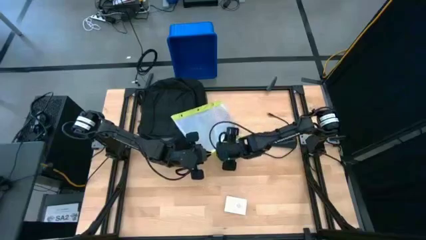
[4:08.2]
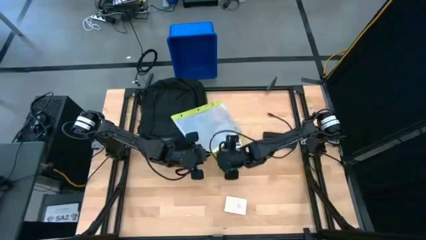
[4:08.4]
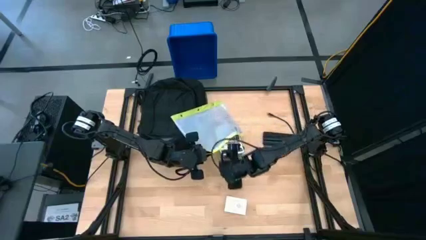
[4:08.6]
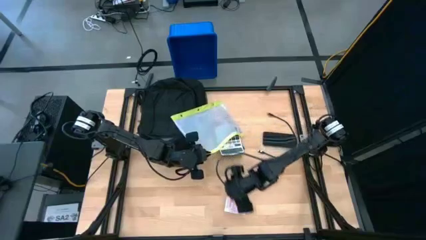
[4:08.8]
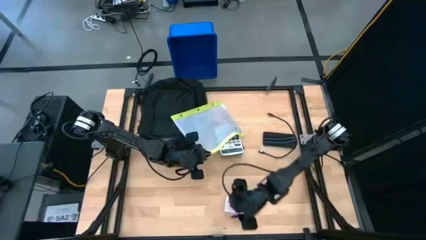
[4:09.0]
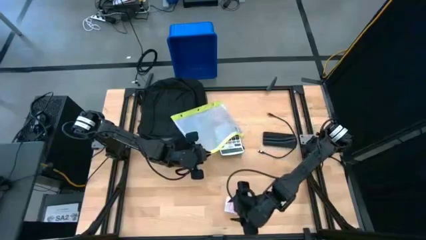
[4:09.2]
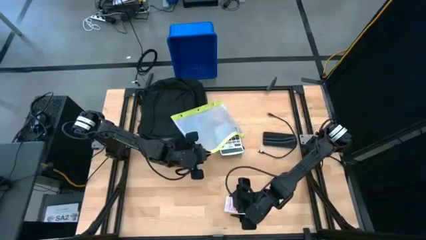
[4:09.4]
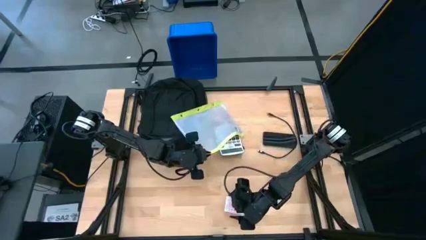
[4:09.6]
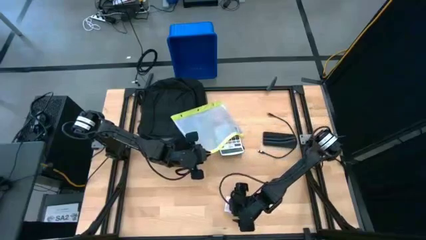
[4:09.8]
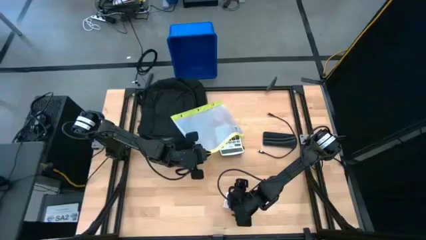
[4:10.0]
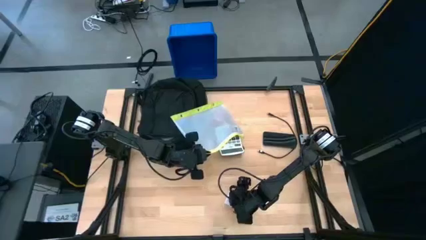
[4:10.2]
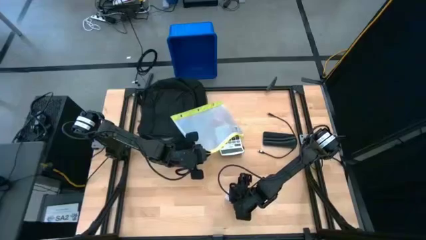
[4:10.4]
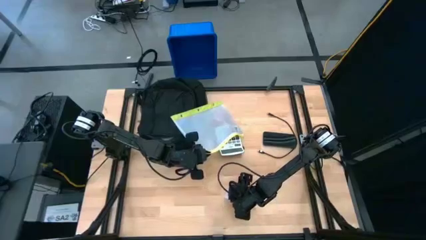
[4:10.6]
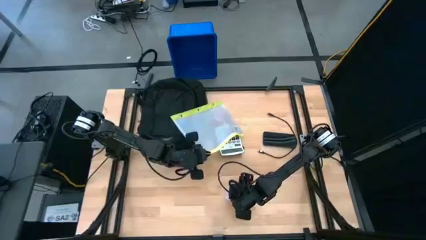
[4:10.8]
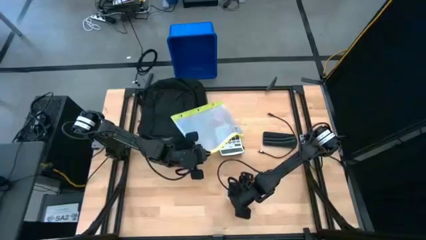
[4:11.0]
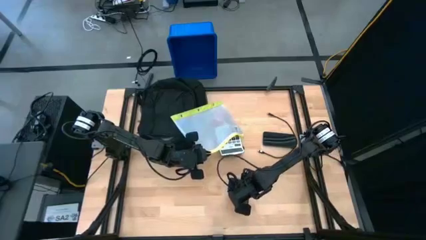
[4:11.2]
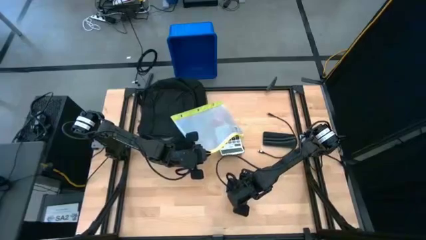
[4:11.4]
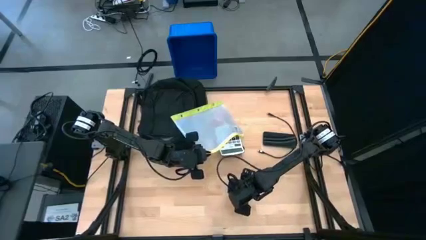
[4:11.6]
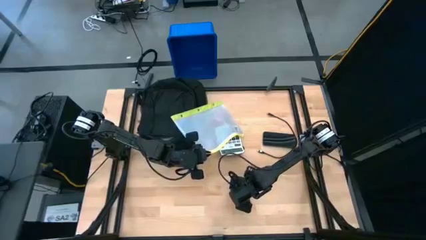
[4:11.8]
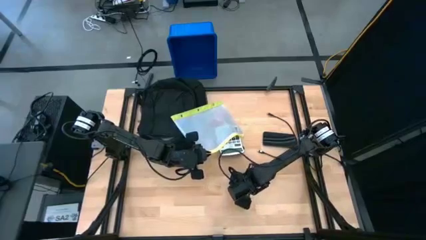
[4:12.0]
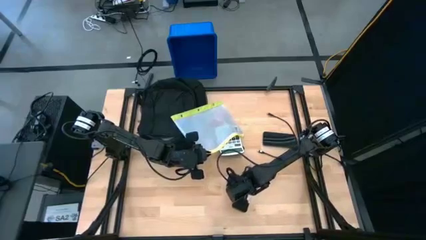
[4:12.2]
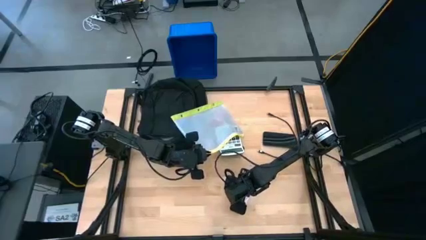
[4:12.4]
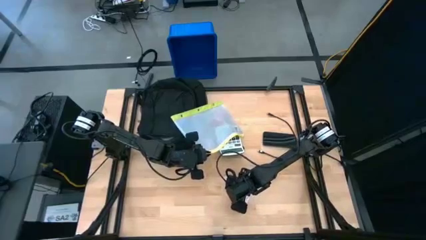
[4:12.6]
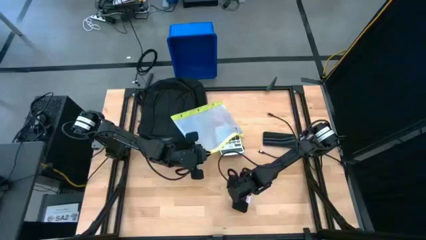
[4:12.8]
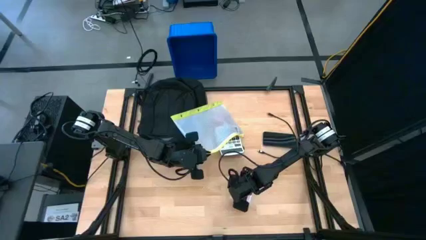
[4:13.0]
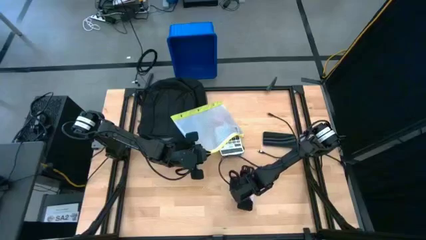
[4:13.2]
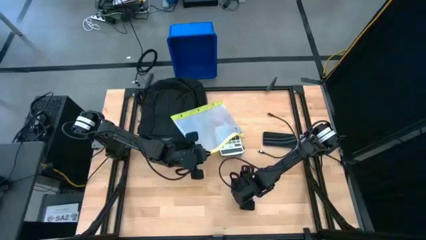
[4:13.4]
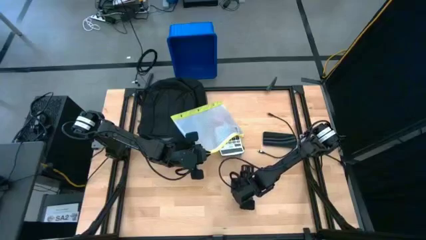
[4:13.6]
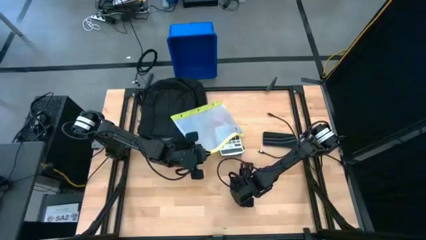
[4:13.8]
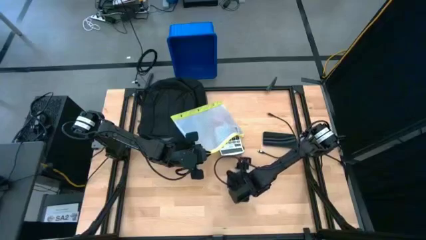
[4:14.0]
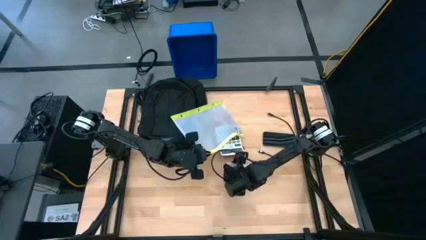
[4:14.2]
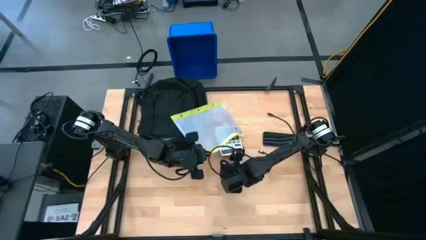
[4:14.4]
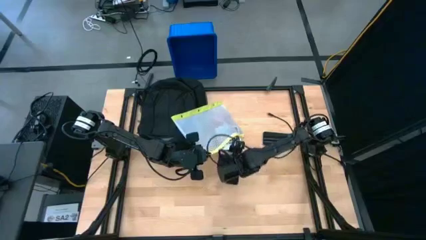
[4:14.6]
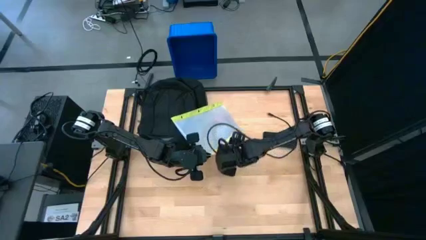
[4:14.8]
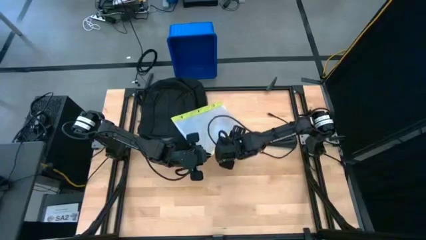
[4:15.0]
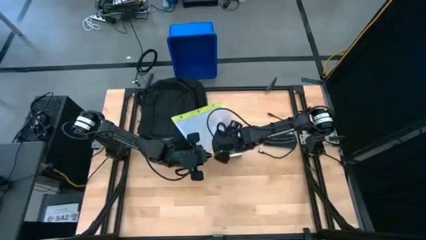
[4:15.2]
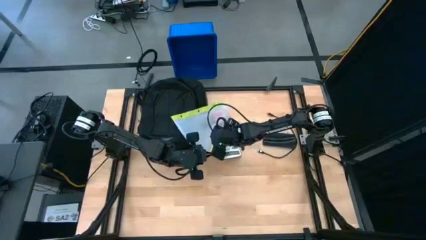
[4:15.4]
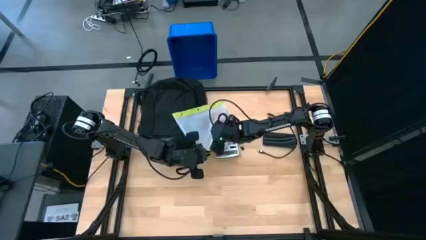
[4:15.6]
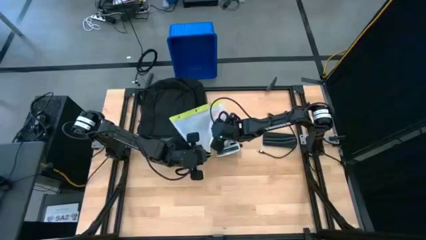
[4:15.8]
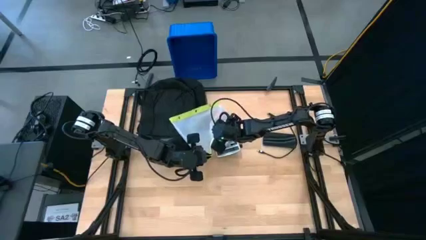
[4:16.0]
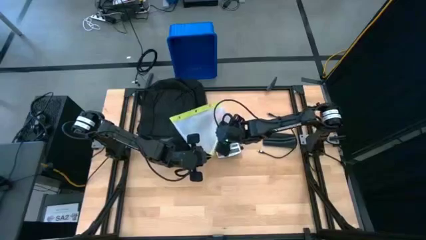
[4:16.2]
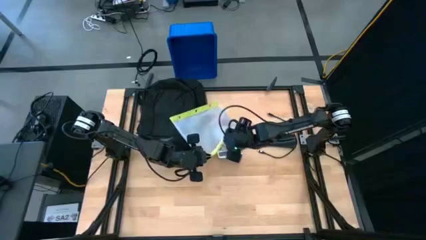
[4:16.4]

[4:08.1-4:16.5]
Task: Unpack backpack
Put the deck of cards into the zip lock bag

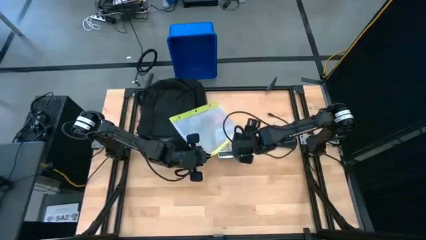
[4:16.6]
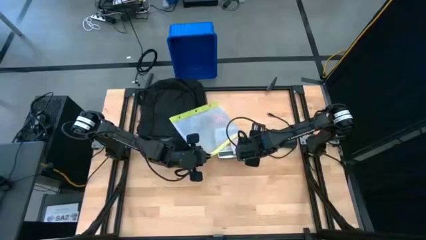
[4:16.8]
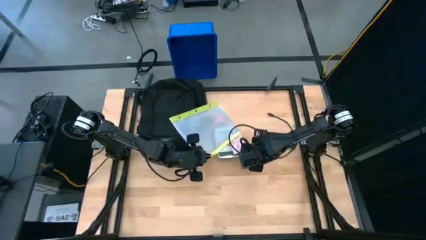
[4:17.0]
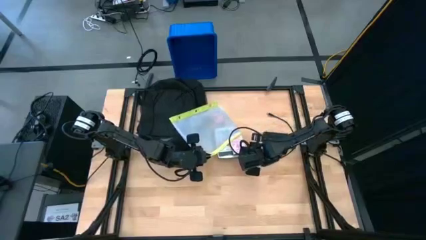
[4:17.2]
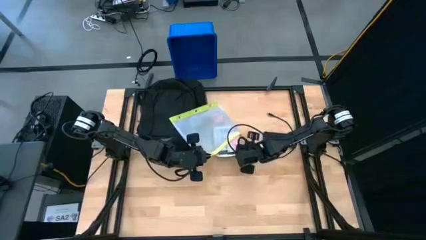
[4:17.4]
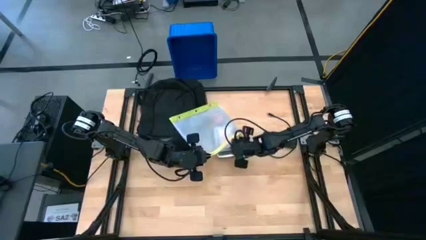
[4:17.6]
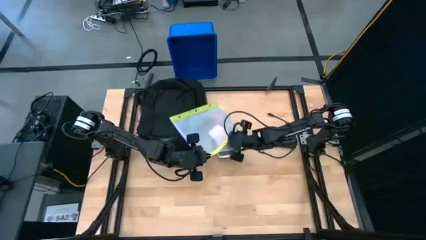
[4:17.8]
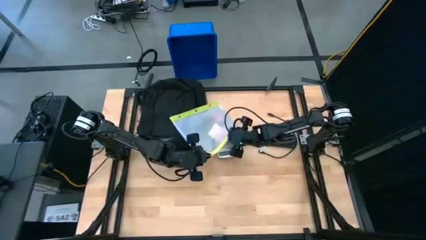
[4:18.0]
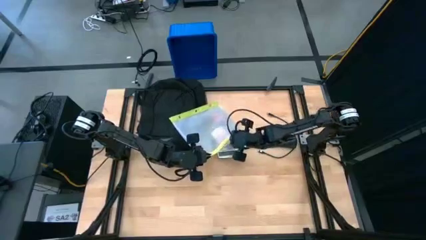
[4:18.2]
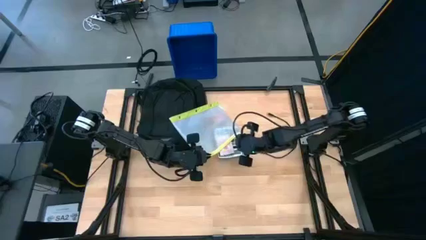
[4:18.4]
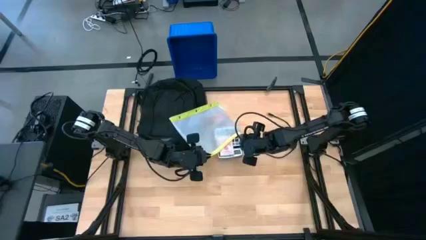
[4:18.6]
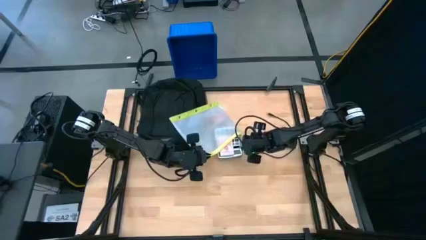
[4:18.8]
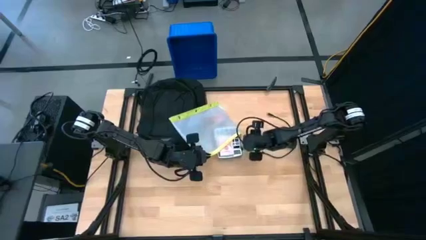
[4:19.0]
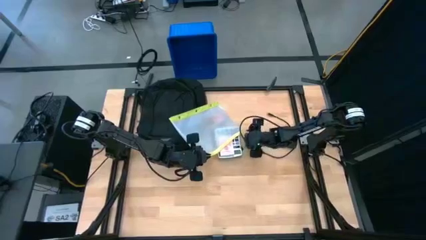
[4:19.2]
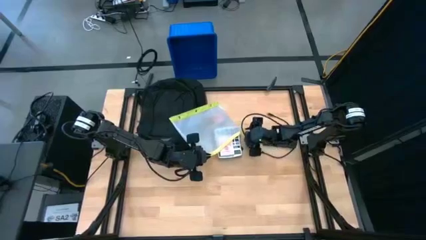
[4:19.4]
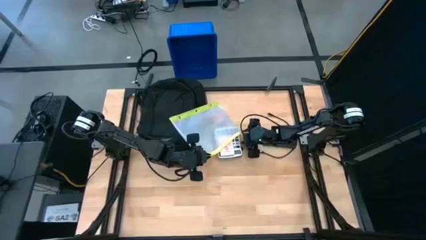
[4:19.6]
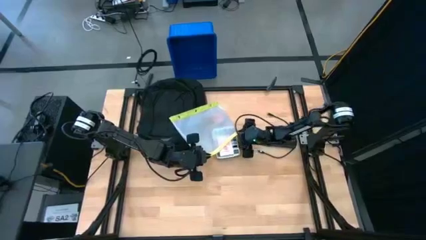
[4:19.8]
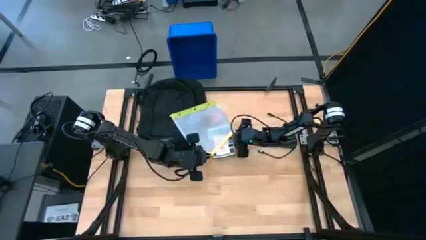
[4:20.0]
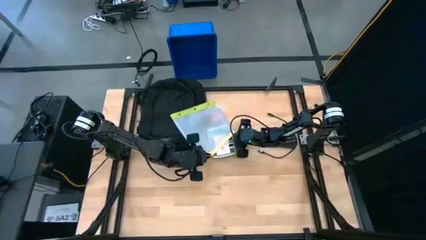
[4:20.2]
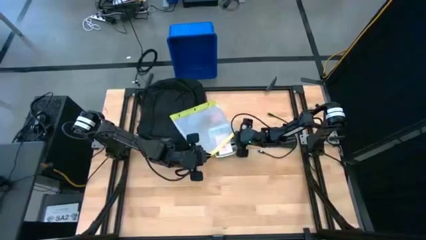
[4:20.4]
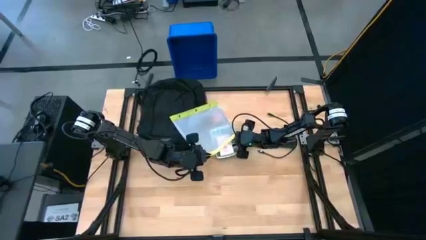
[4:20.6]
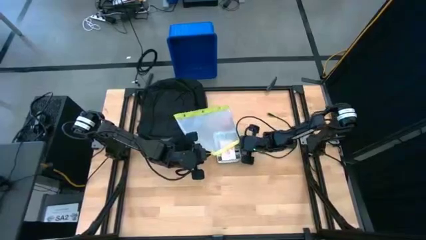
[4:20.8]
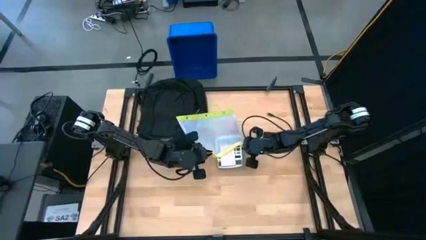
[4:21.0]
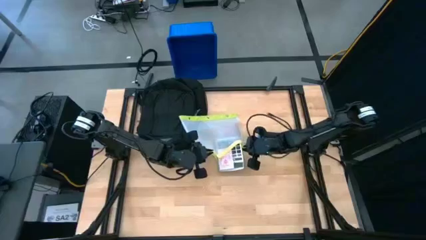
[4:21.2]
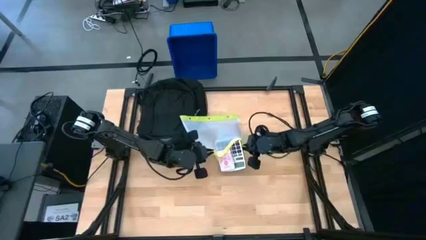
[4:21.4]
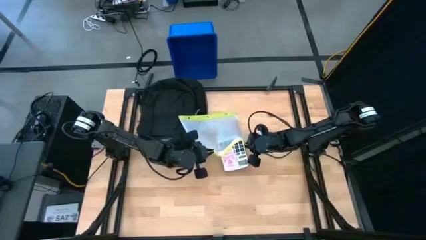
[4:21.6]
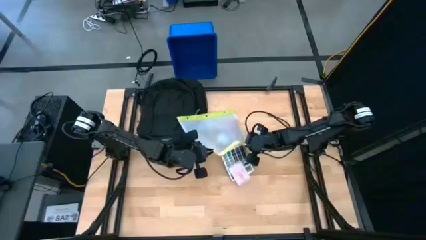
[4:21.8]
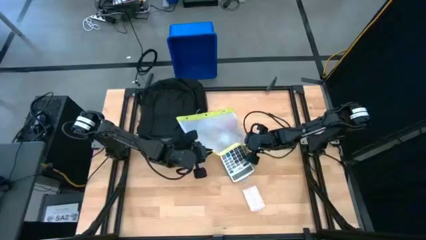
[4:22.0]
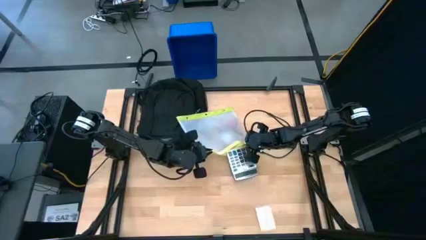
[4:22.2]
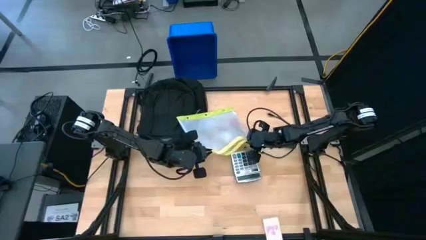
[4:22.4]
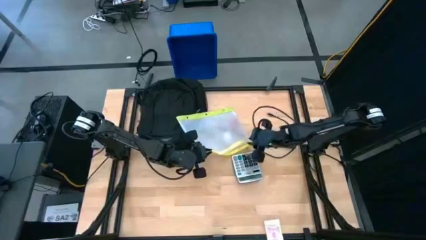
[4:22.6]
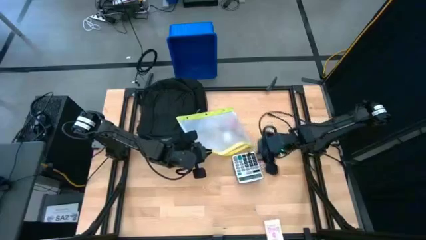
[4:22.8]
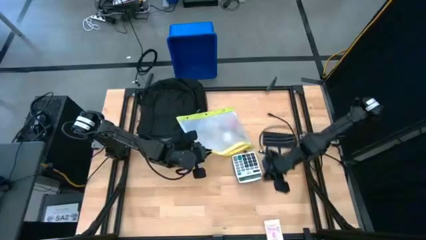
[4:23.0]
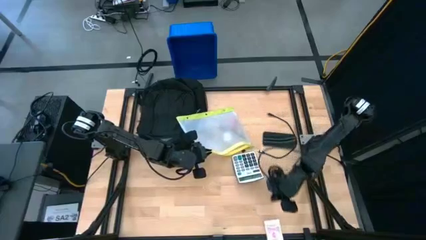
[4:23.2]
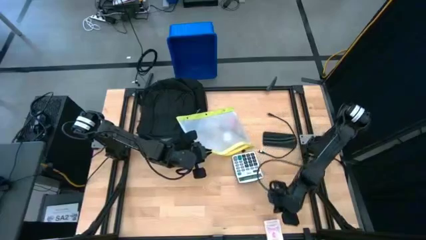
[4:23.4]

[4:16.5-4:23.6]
Close the zip lock bag

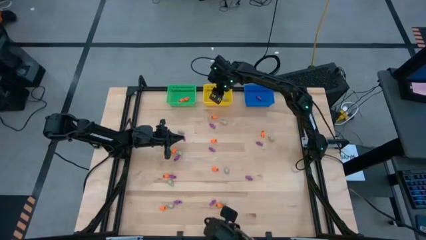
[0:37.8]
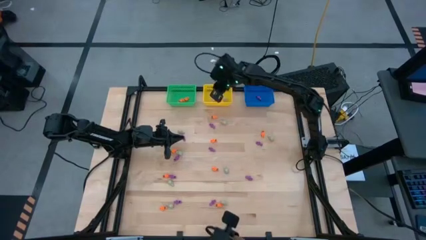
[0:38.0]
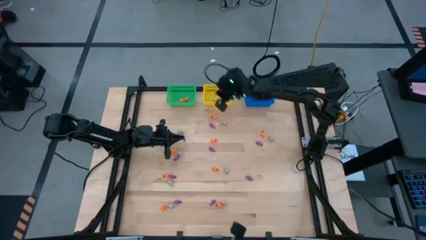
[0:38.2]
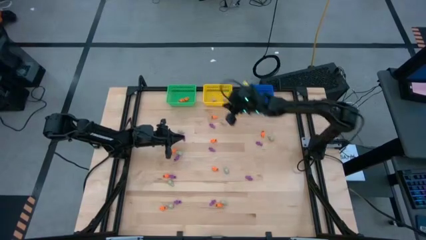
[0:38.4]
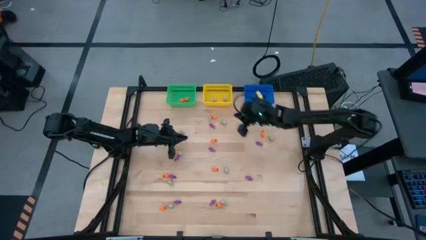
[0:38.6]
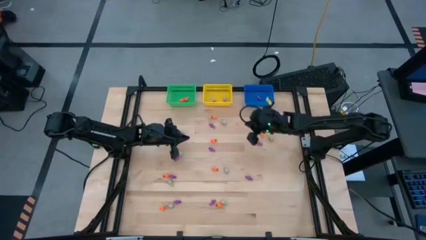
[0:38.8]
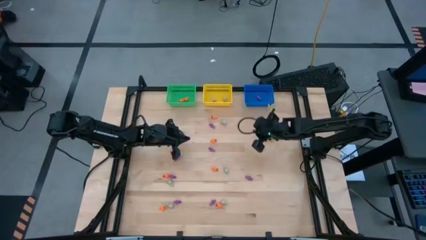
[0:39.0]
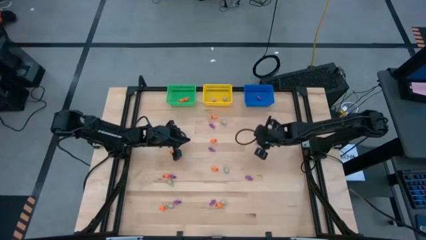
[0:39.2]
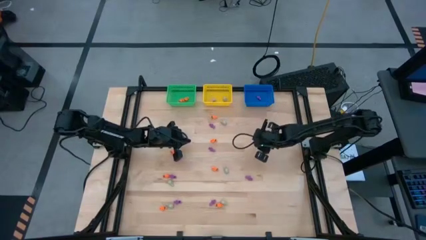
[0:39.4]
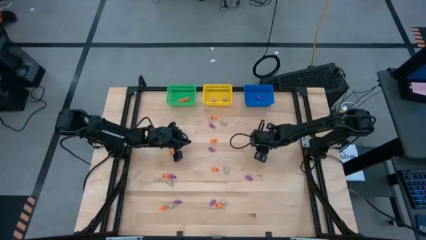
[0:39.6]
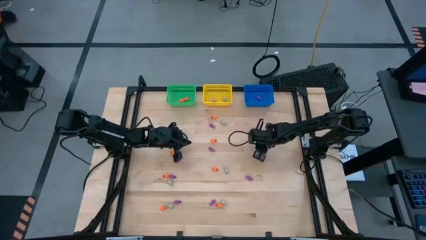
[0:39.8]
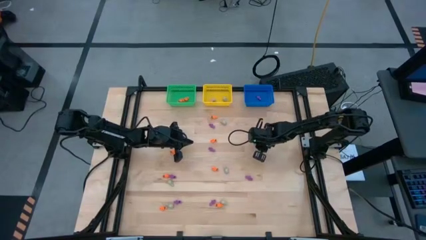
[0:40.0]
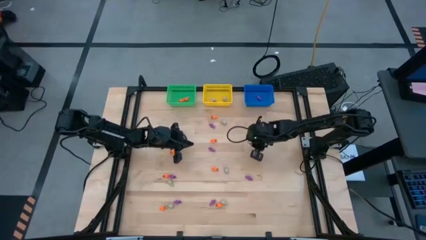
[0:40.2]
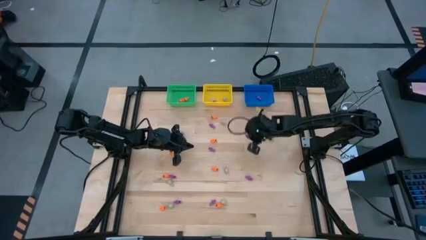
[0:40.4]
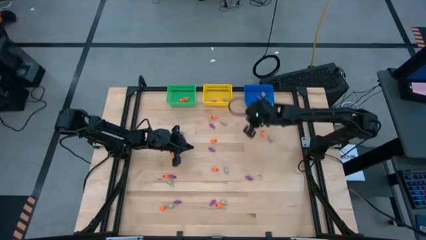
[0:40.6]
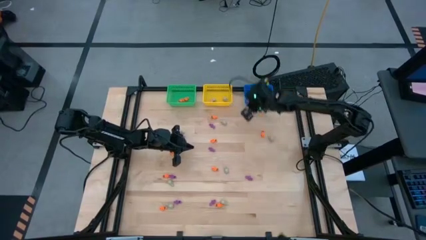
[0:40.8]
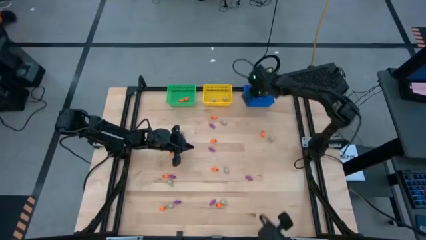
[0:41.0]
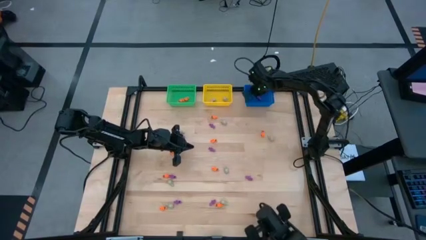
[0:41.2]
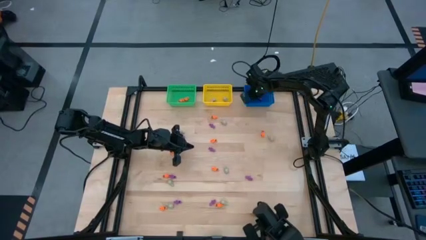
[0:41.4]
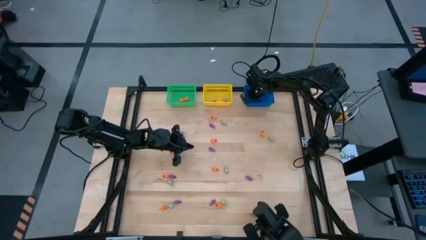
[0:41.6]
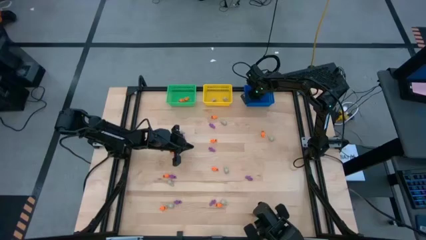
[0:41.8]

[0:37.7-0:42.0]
Task: Sort Halloween decoration
Put the violet skeleton toy into the blue bin
